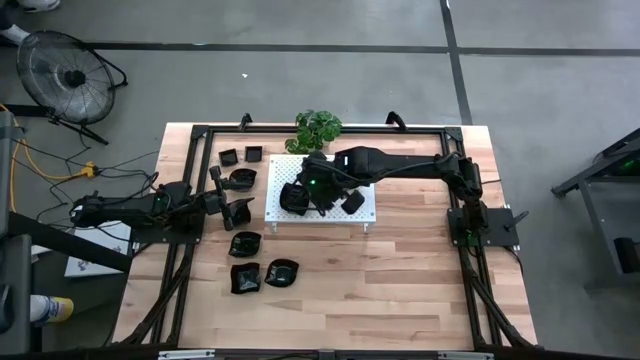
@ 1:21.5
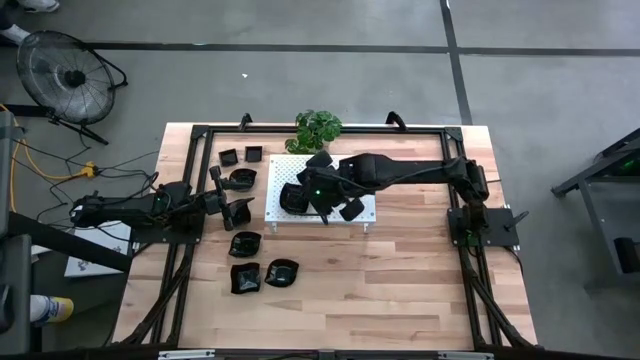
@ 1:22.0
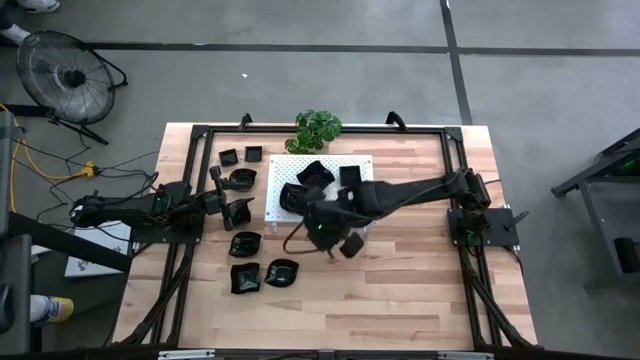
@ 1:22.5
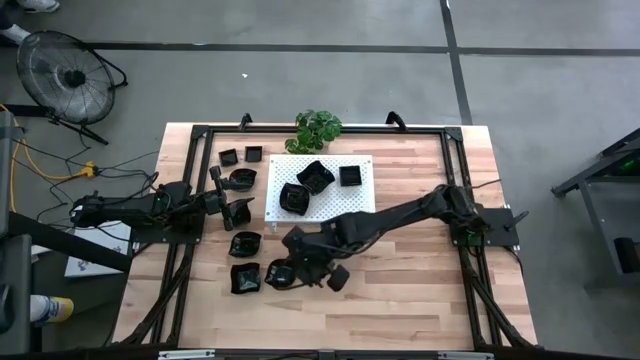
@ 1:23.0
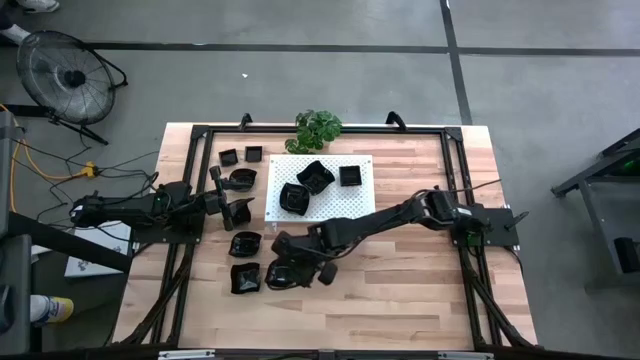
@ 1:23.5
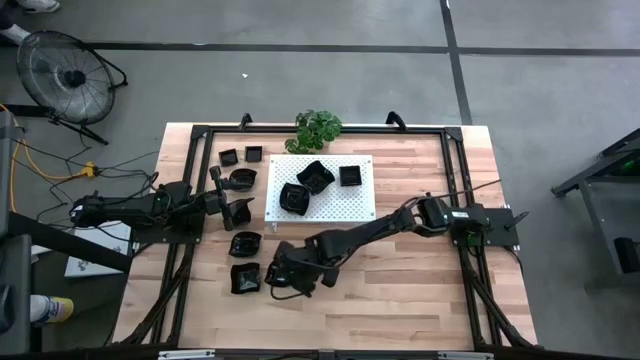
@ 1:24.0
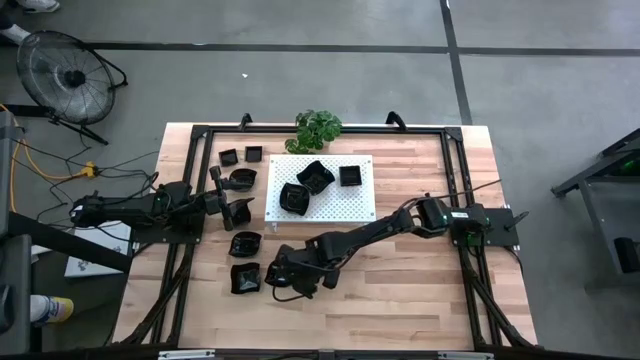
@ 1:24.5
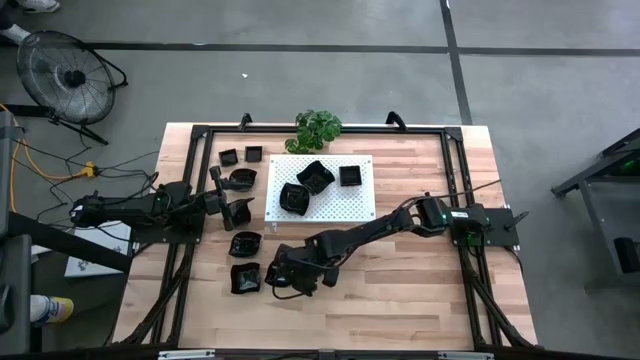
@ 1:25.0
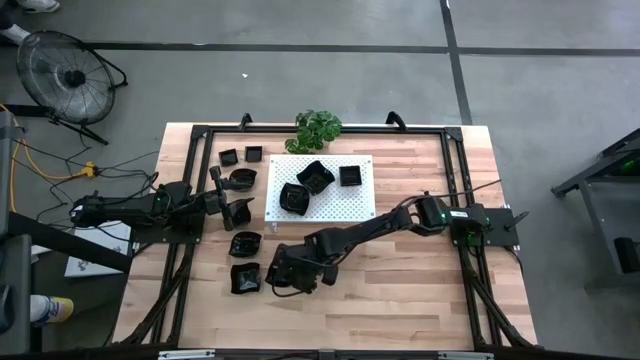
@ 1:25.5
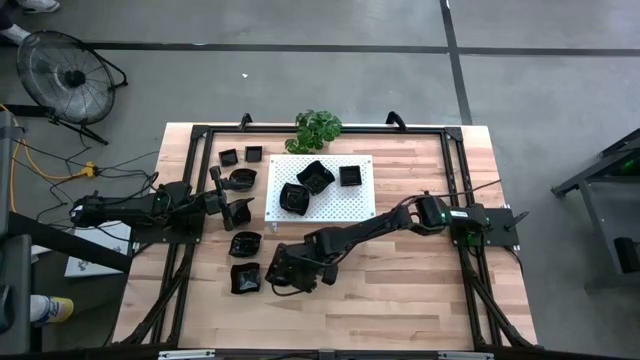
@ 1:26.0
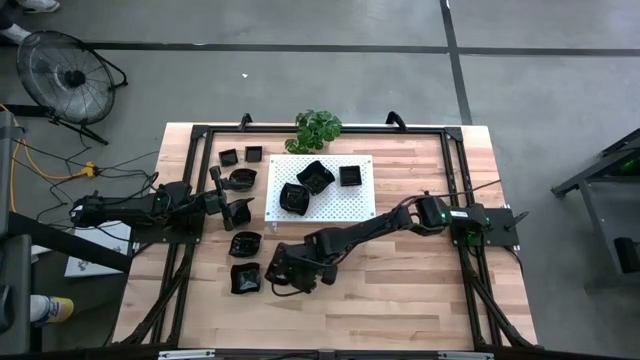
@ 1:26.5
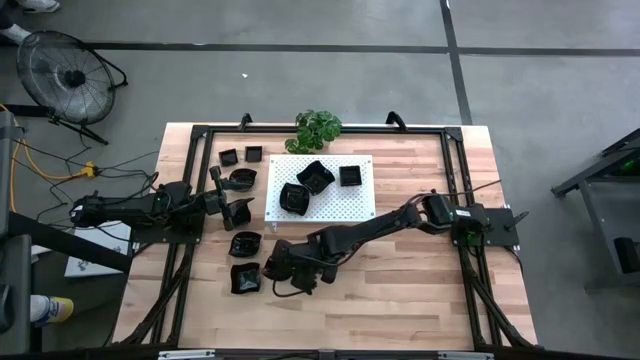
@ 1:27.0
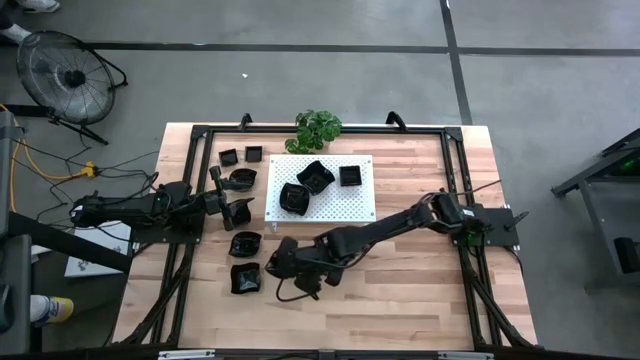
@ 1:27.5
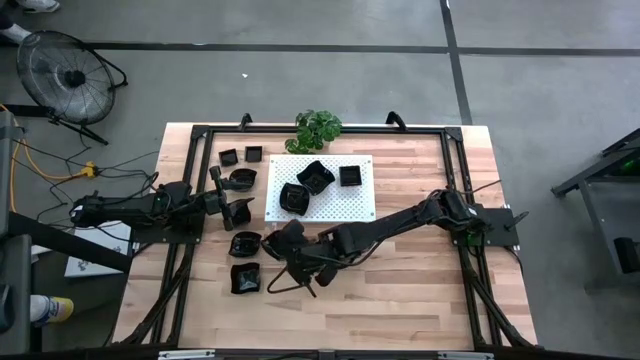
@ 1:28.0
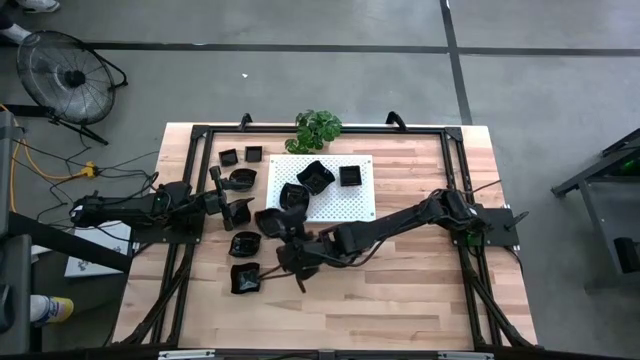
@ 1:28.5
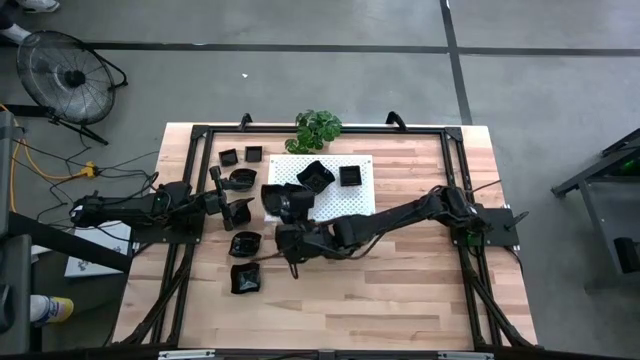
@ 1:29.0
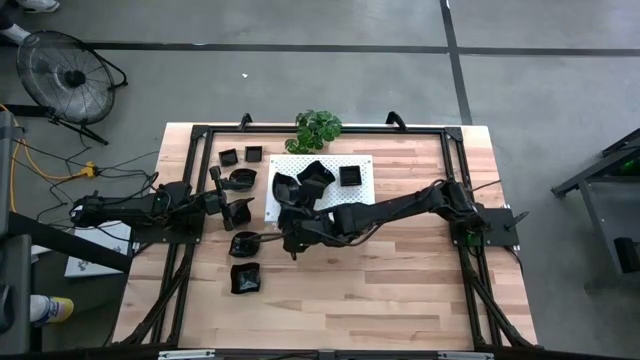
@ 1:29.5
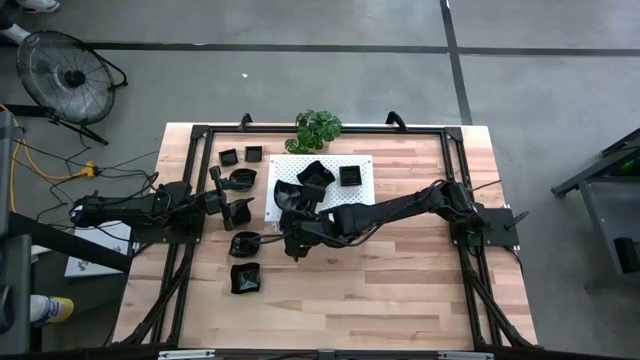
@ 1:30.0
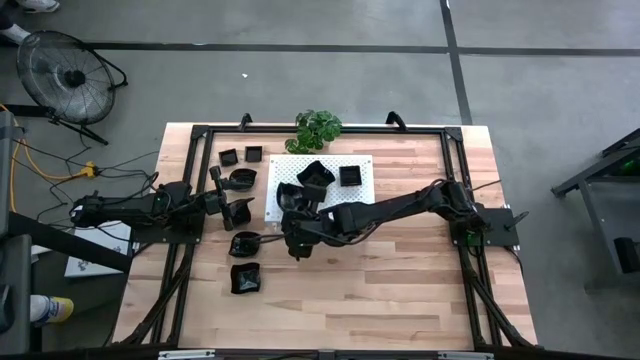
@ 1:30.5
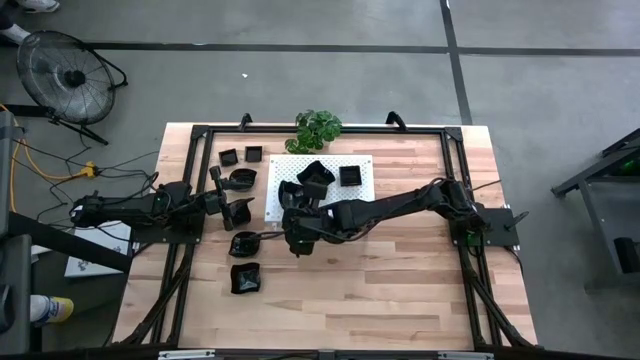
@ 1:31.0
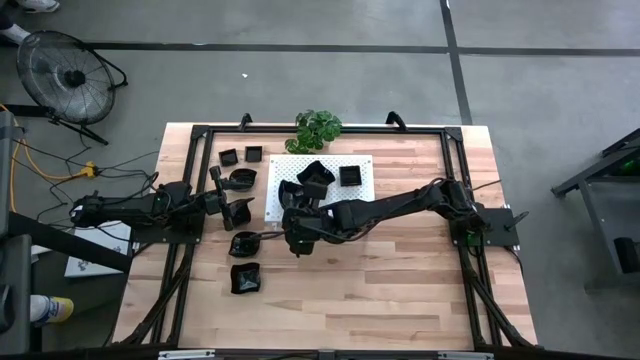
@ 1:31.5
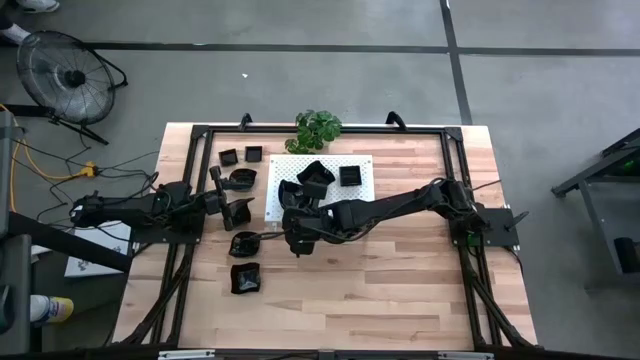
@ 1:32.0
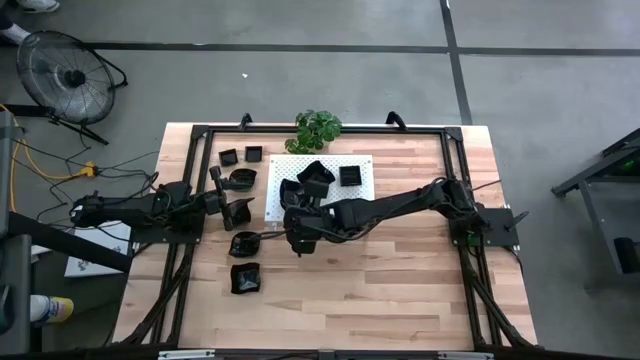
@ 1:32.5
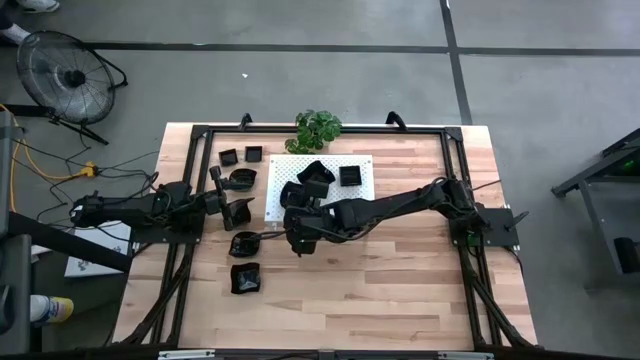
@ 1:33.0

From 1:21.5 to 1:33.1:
Task: Pick & Place Mini shaped plates
Stack the leaf shaped plate on top of the leaf shaped plates on the shelf

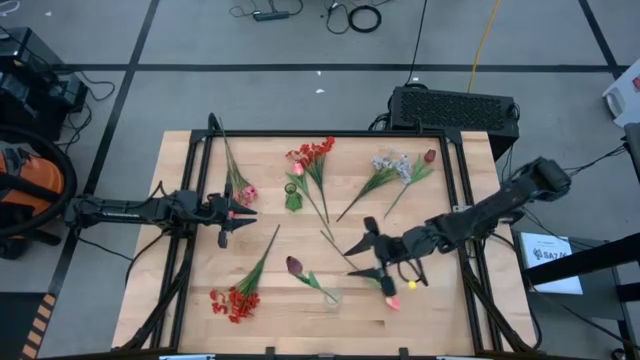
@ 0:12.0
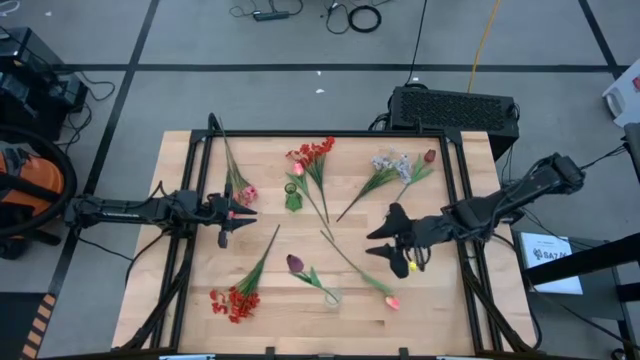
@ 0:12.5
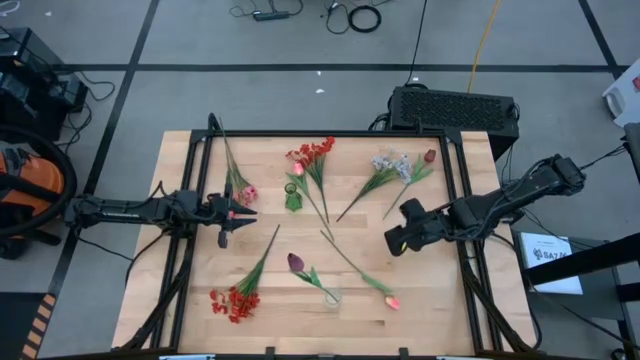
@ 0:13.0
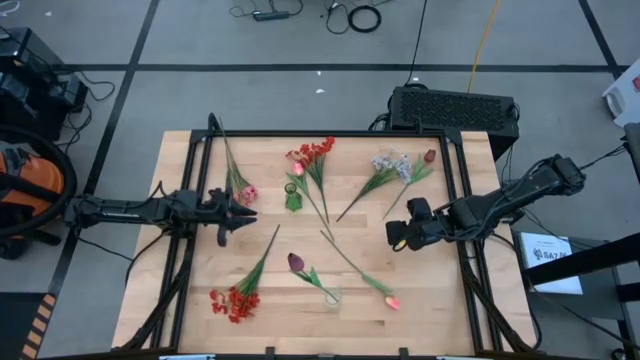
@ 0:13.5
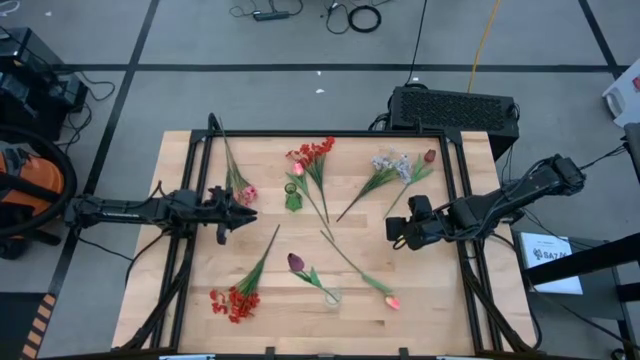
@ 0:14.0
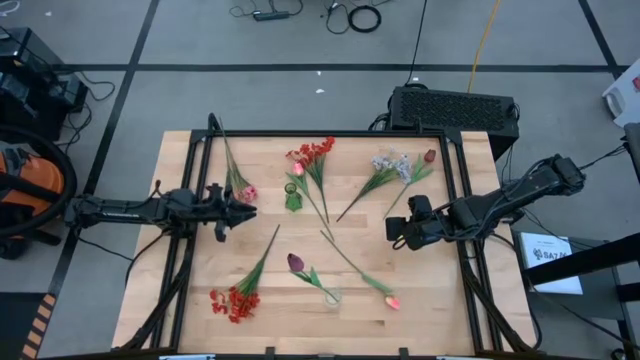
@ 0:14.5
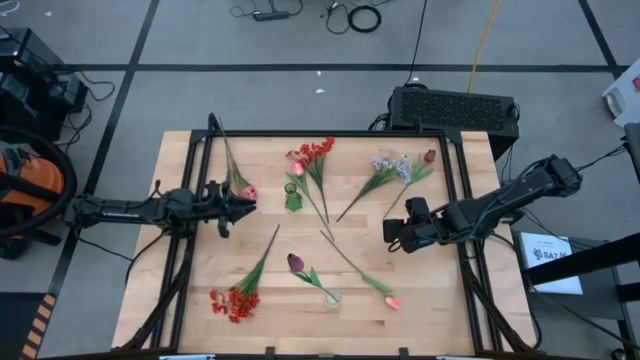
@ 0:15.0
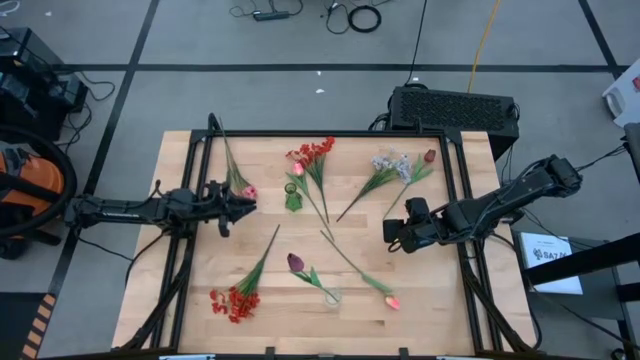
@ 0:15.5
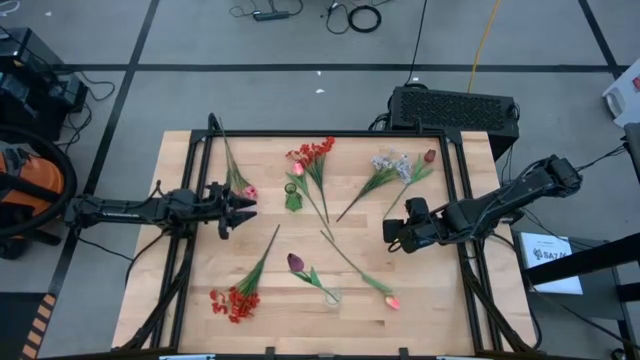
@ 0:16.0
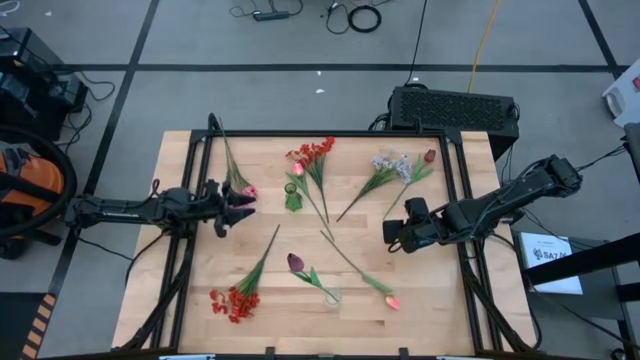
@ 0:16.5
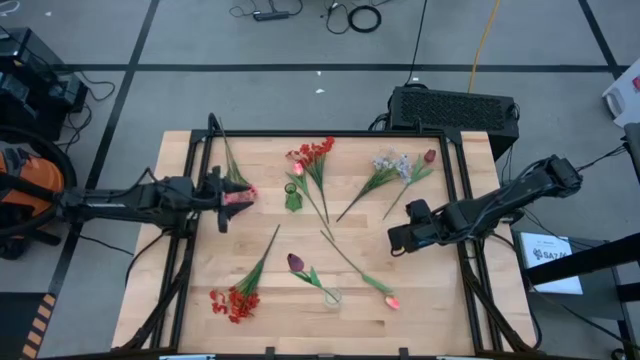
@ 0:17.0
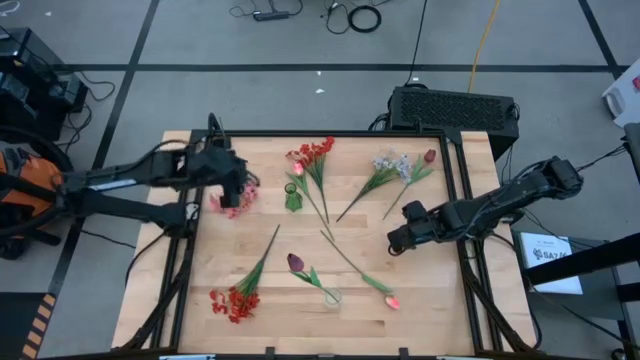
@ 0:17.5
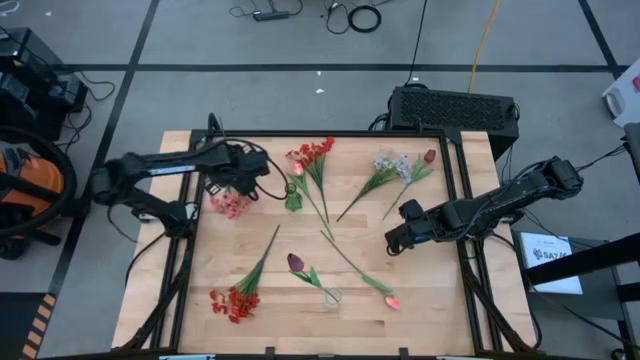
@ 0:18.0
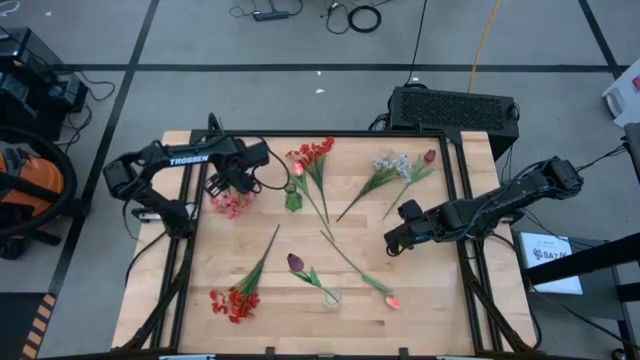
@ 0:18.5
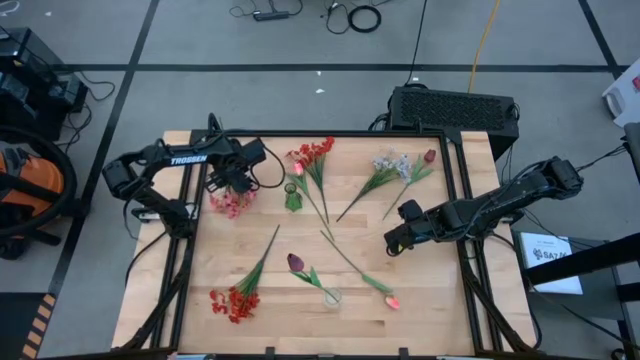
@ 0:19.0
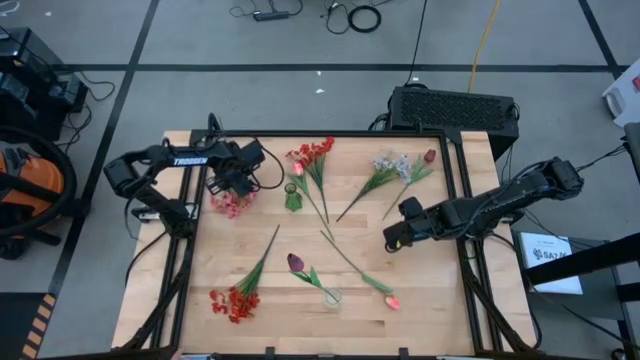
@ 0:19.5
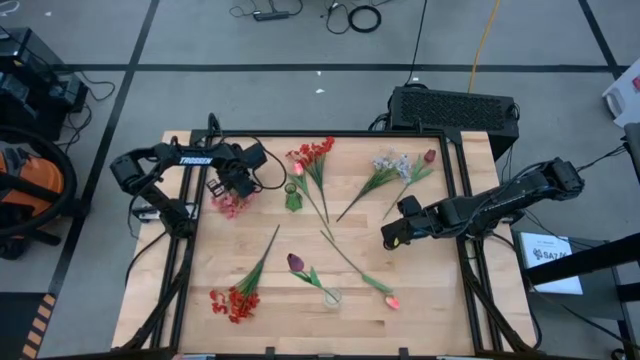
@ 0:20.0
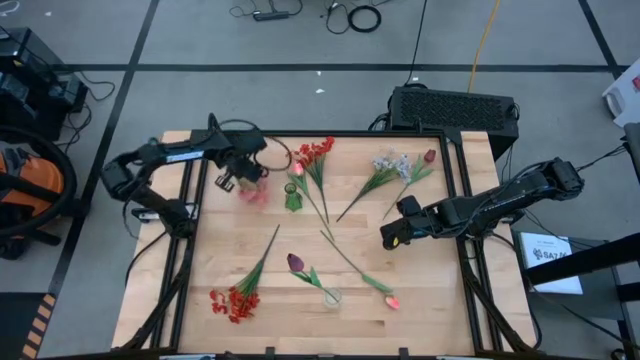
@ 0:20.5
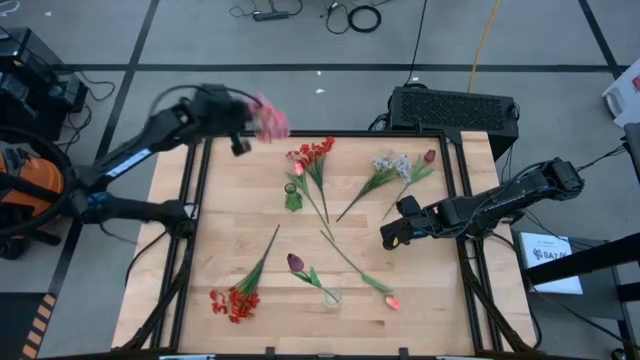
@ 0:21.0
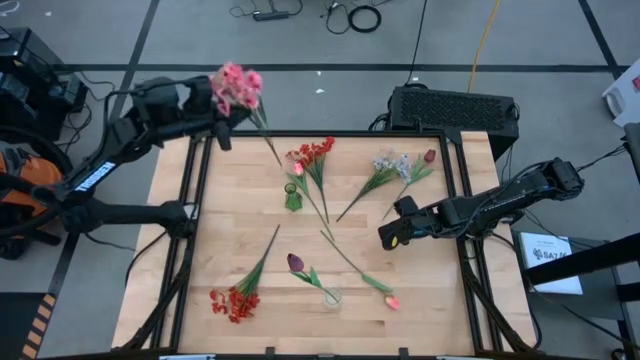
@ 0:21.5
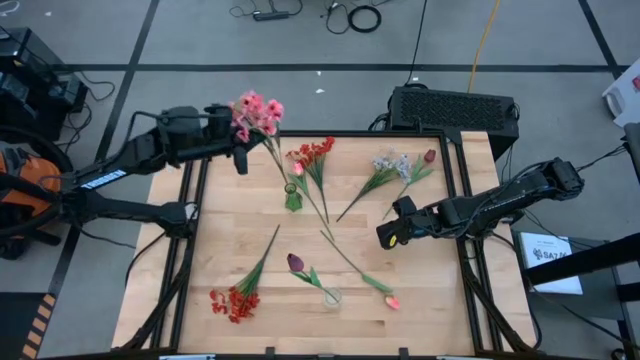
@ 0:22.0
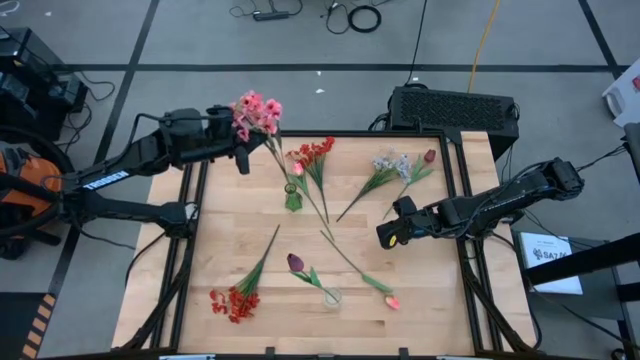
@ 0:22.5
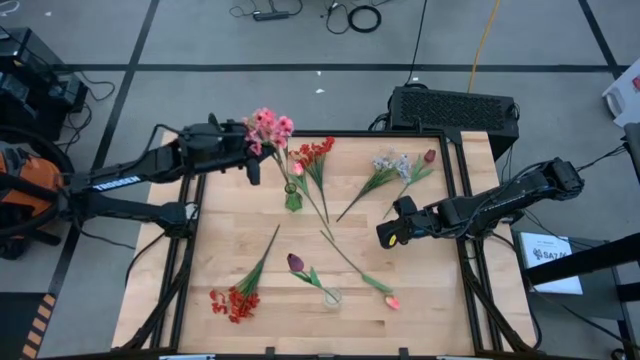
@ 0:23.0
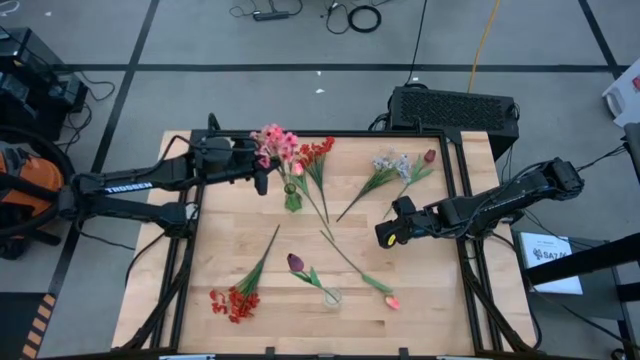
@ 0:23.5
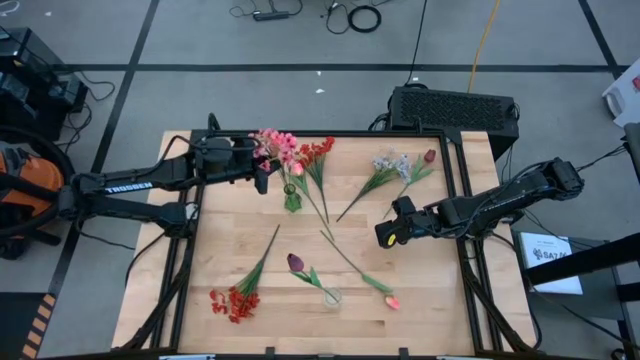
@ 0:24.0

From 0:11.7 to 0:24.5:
Task: Sort flowers into vase by color
Put the pink flowers into the green vase
